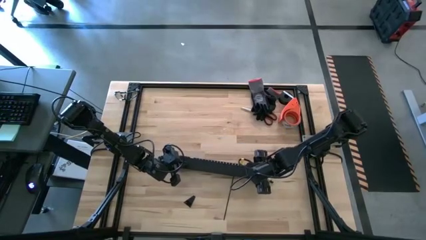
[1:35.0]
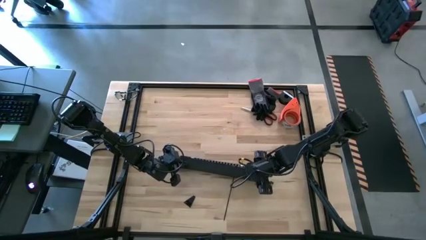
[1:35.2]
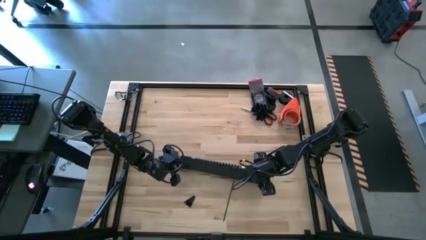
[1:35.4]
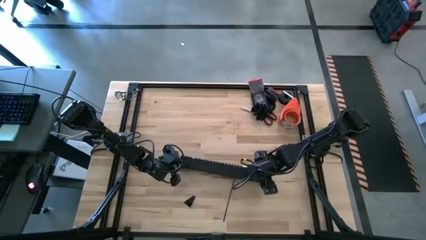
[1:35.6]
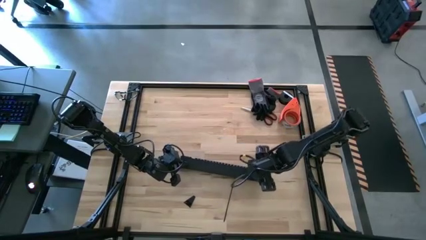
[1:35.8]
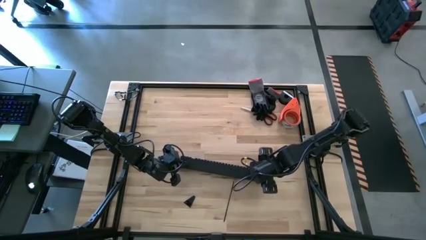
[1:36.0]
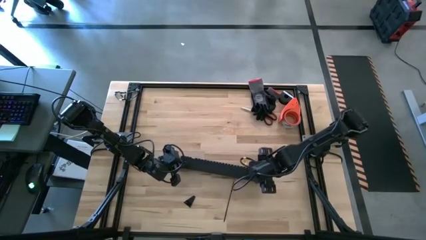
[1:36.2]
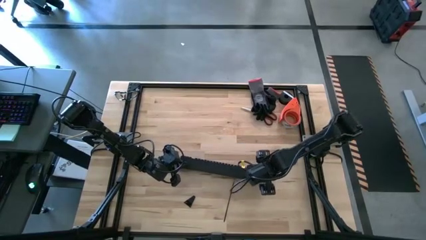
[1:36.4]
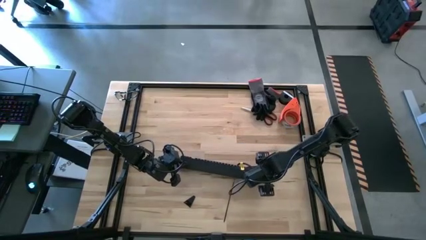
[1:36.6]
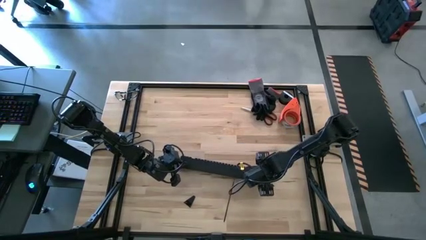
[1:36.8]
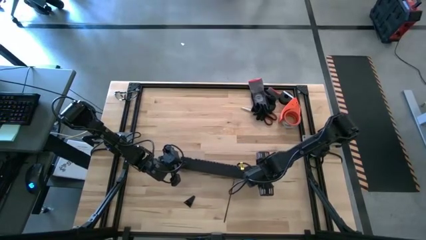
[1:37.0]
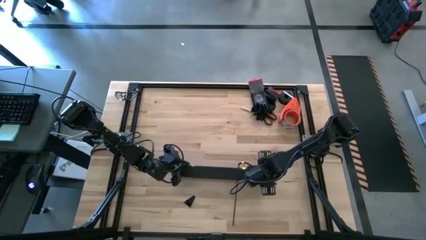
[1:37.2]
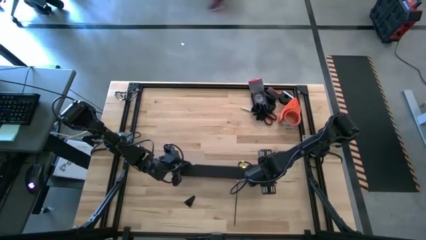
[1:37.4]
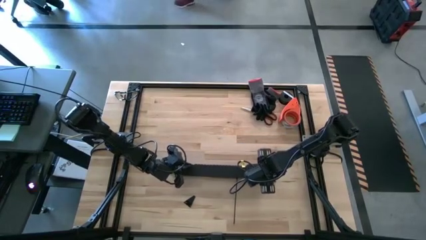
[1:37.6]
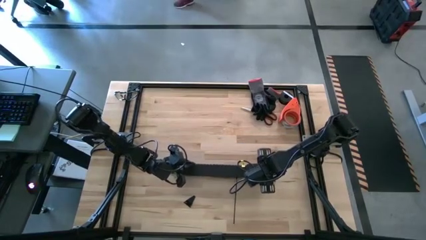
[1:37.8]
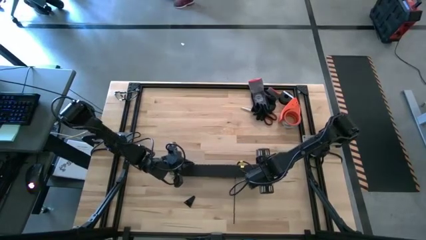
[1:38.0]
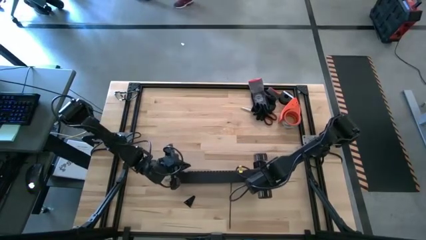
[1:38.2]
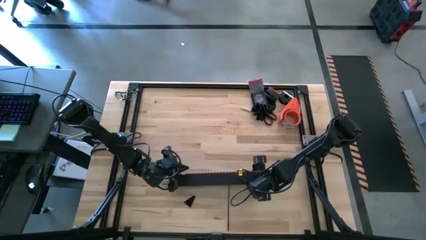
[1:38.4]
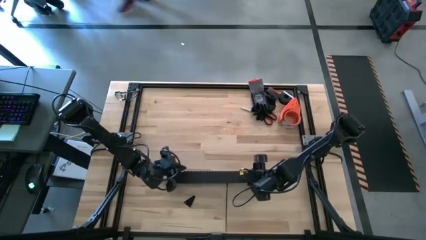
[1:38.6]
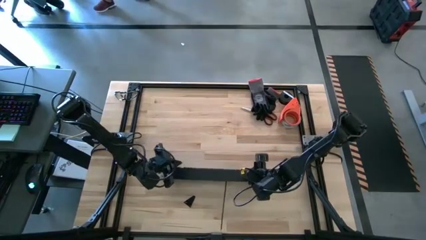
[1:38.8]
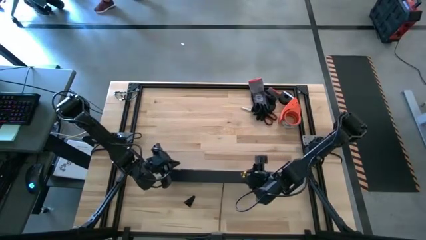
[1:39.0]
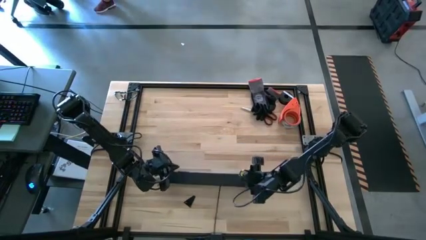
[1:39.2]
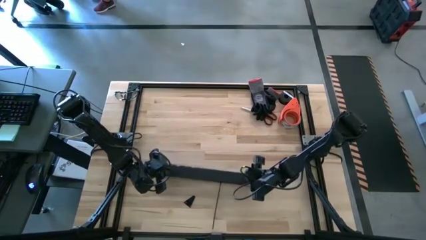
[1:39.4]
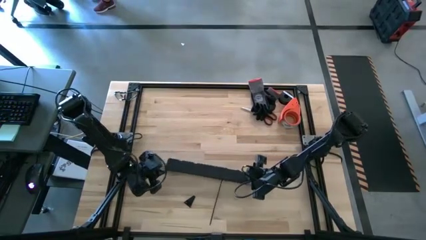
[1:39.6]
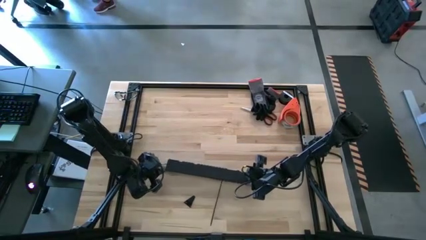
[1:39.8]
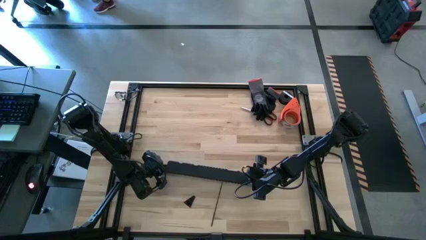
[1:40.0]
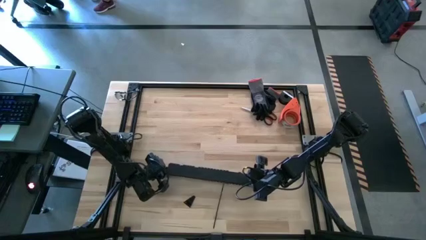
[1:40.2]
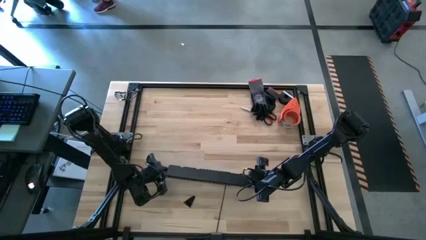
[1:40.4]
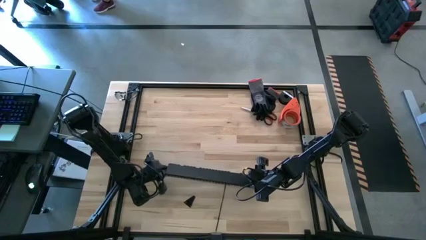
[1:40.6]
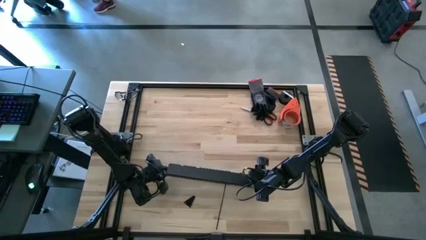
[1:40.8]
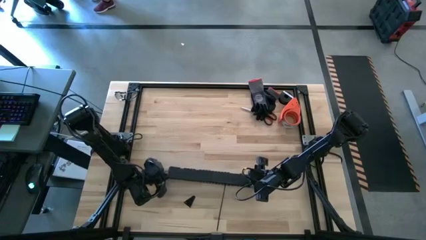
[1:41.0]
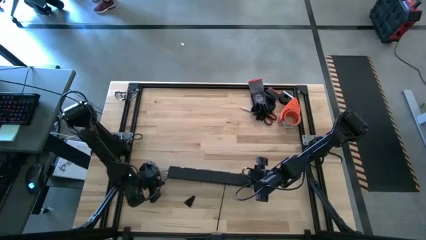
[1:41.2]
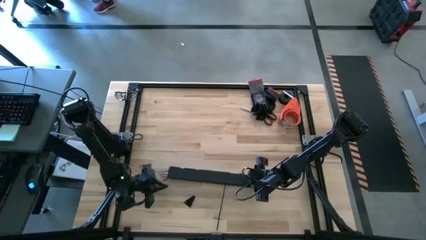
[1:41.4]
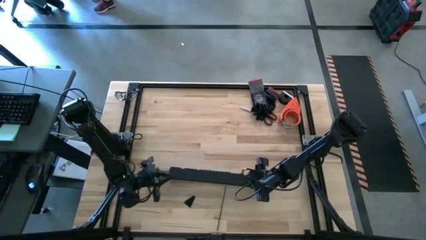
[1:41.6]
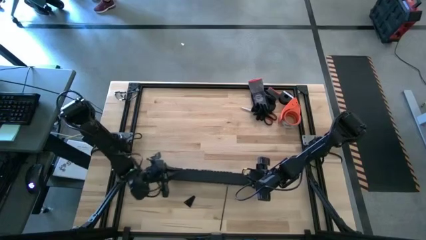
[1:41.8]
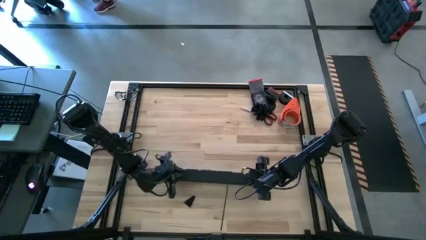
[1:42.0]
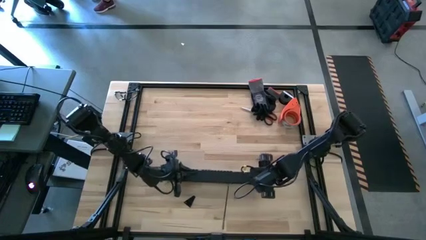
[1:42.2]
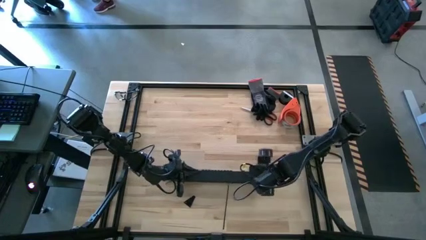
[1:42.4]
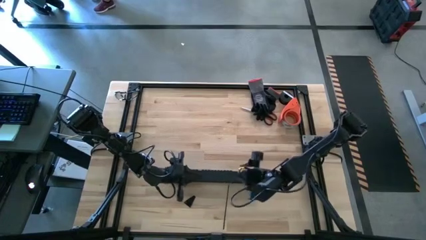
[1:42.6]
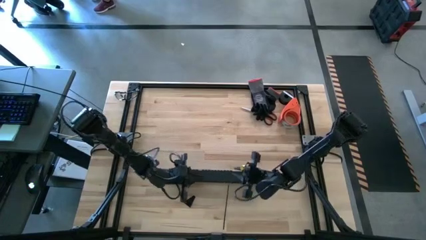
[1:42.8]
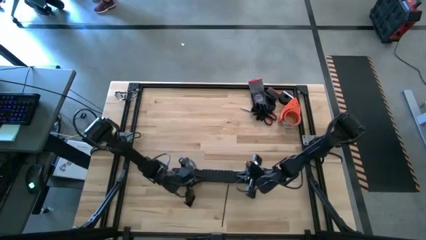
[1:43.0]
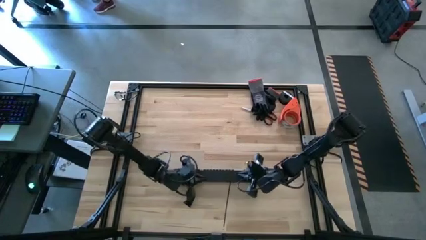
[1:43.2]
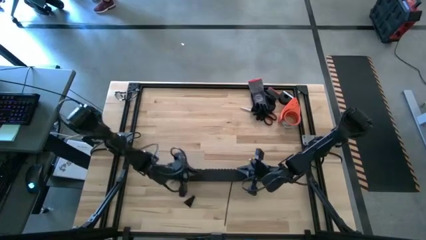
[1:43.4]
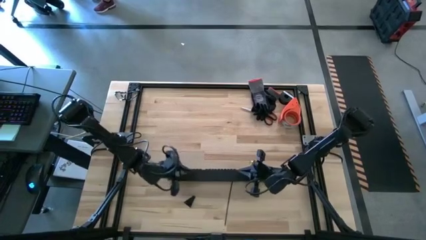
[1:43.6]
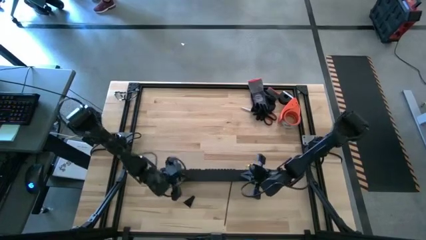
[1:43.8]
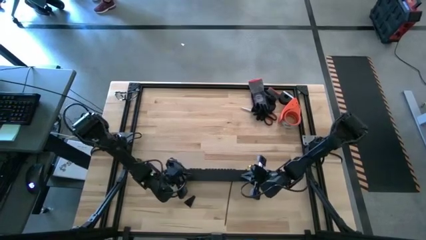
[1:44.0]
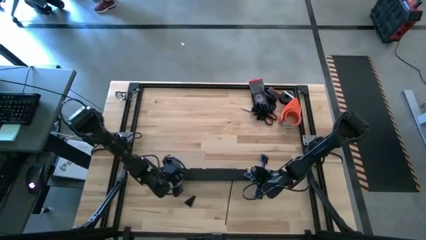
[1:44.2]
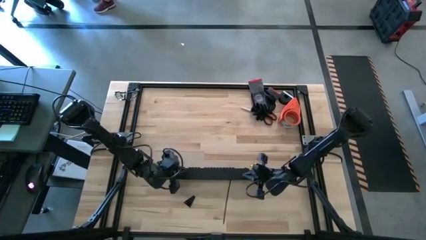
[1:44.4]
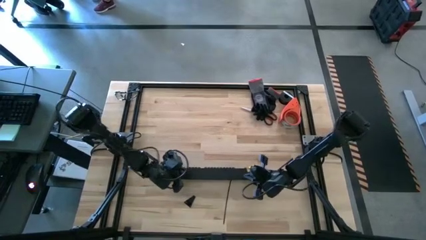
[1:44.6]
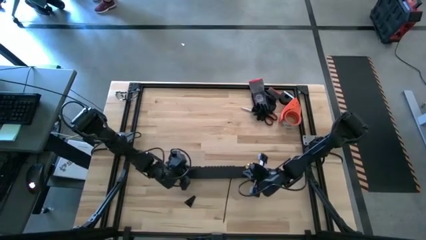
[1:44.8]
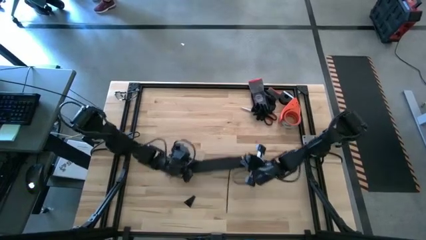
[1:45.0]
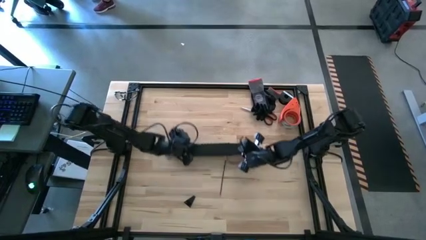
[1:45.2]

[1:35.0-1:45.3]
Task: Ziptie cables
Close the black cable duct

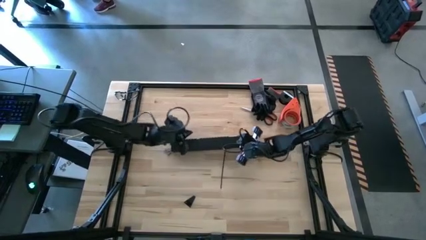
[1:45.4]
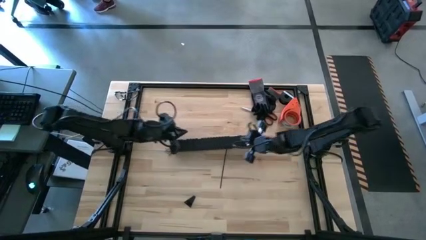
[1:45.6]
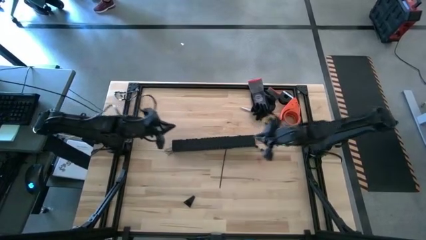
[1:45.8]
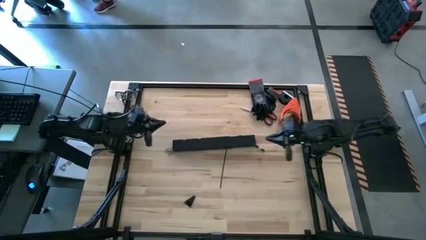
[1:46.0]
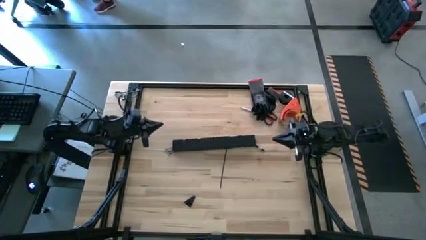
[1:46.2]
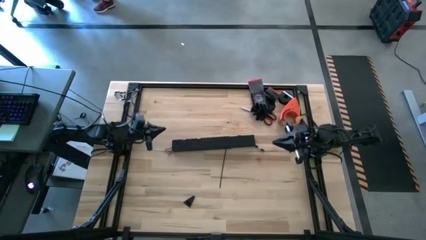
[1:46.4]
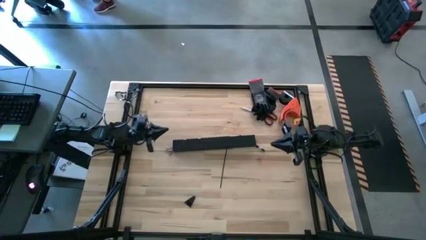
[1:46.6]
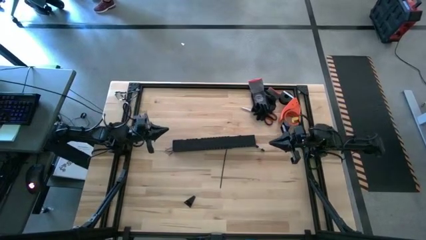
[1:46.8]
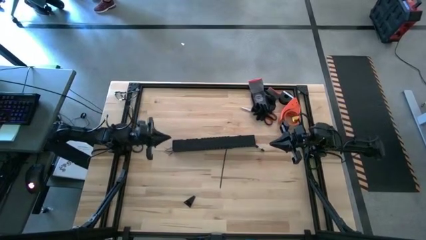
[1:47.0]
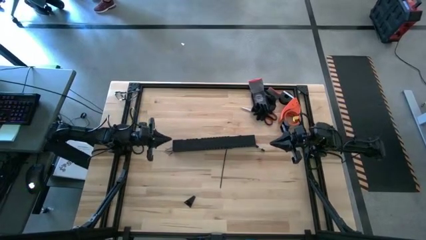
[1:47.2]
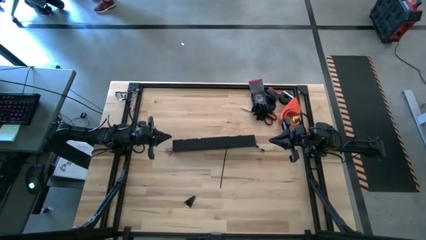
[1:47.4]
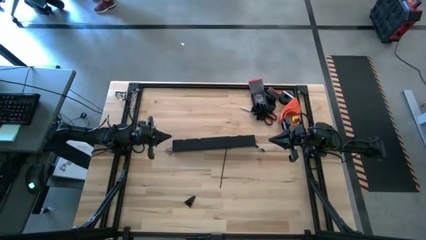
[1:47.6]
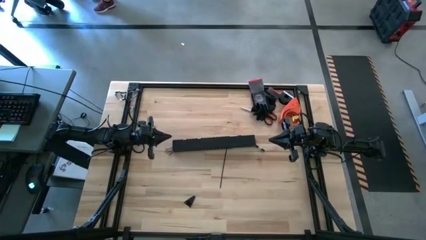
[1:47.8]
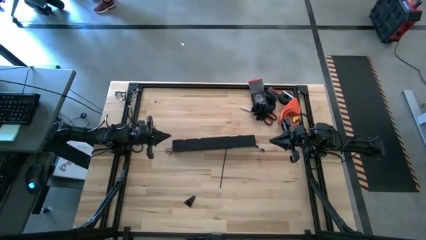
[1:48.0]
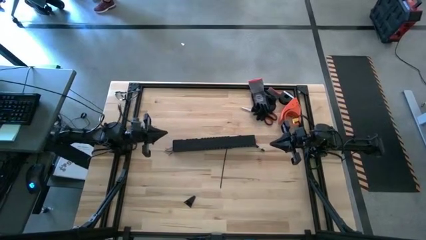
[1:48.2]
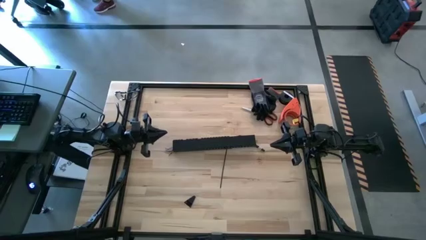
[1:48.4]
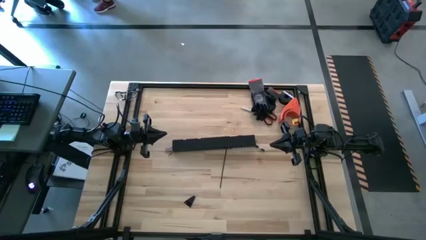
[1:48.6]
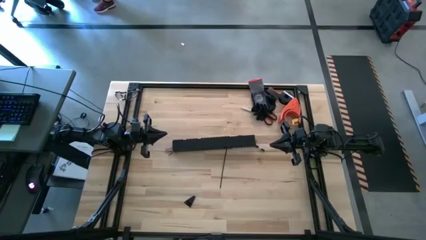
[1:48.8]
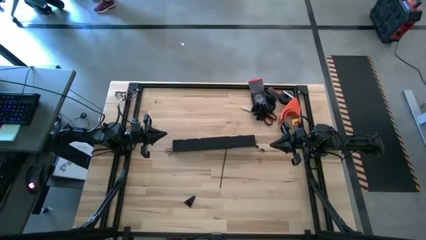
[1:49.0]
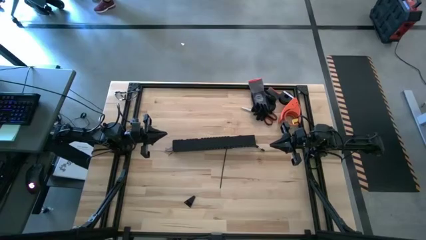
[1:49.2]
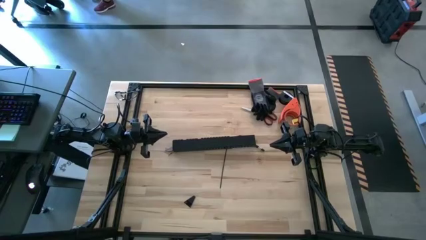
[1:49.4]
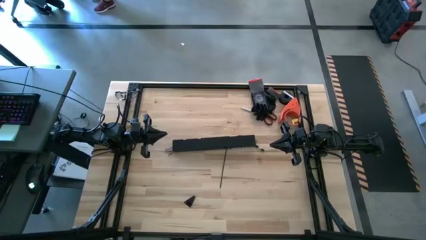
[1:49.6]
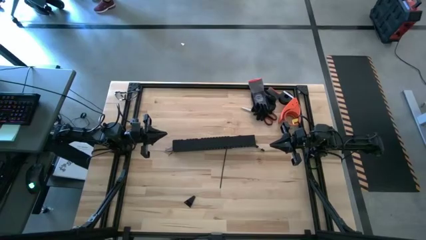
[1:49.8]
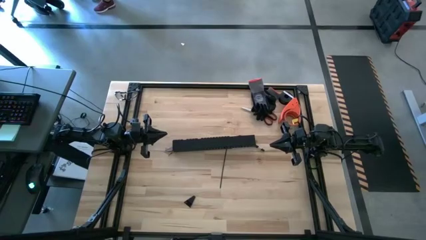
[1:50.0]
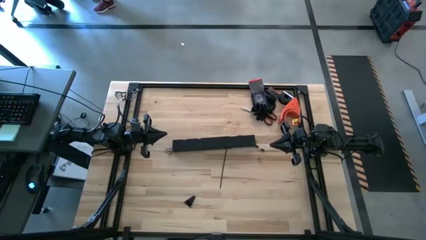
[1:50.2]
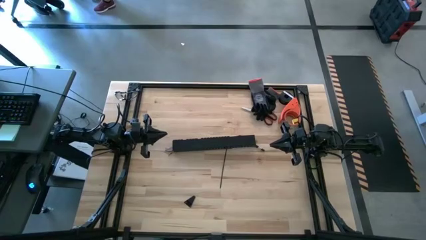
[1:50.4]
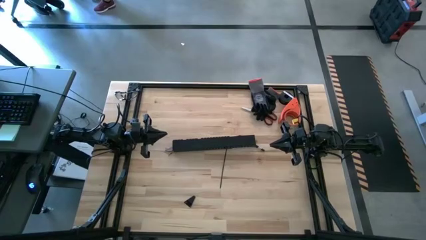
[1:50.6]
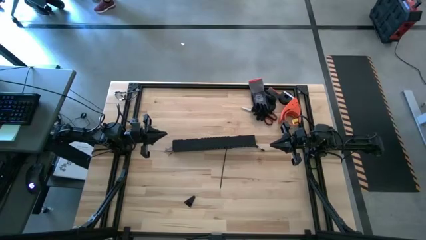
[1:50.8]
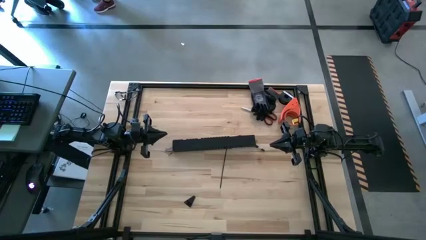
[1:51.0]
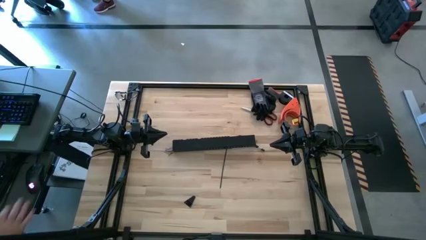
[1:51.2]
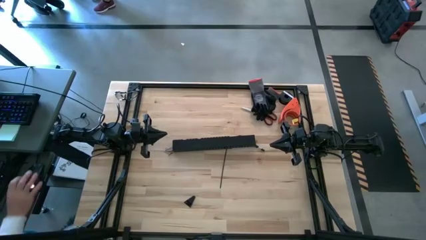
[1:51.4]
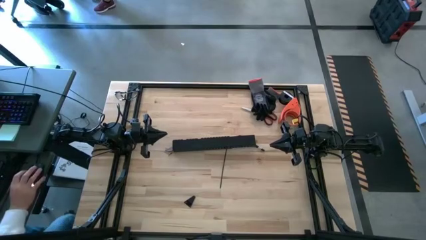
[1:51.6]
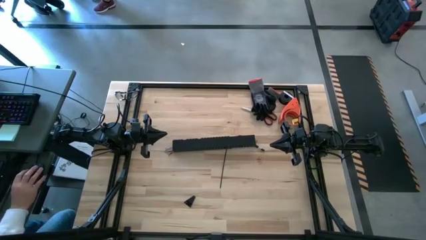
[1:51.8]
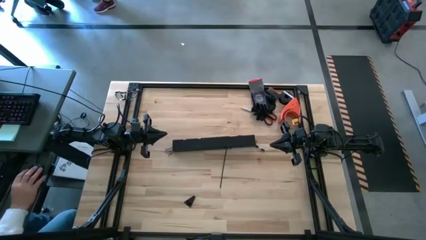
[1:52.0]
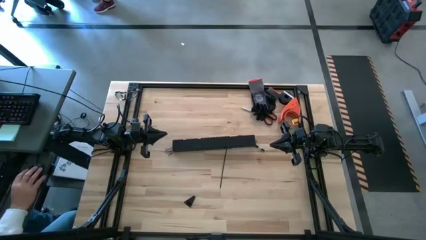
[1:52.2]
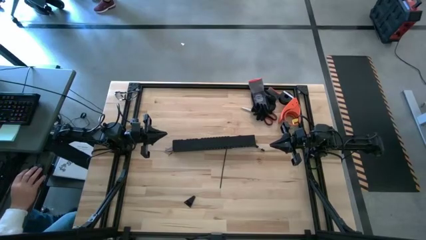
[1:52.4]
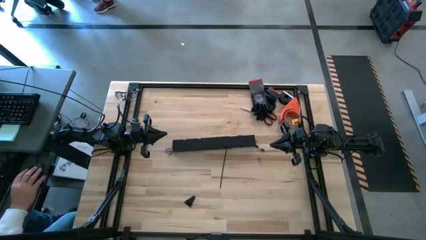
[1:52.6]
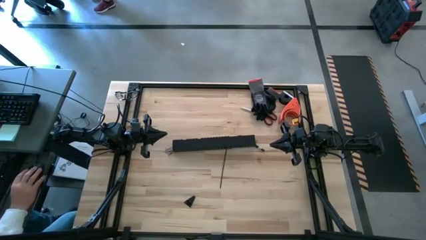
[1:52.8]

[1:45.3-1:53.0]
Return to Home Position
